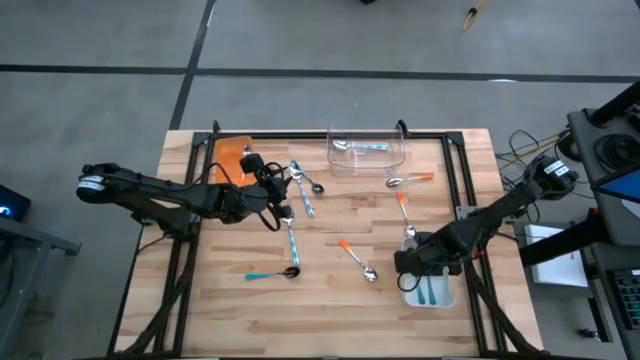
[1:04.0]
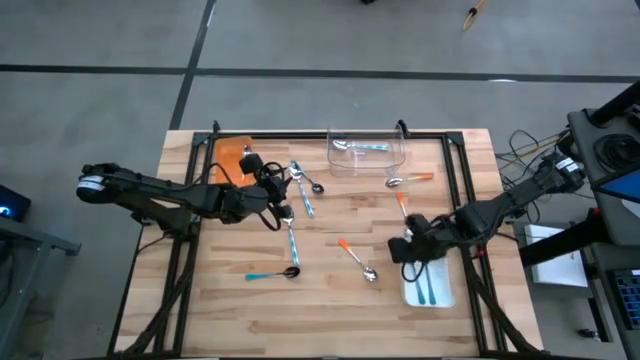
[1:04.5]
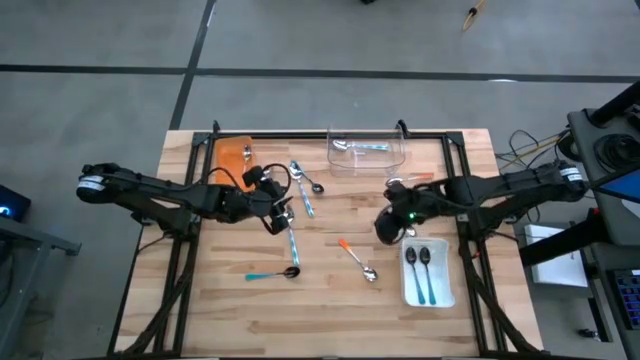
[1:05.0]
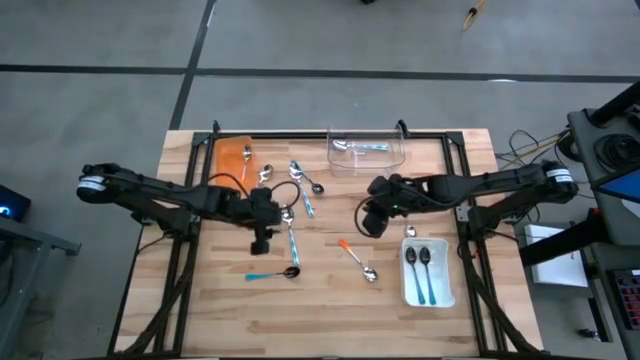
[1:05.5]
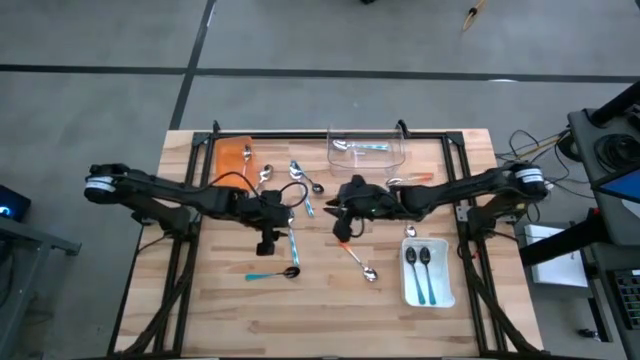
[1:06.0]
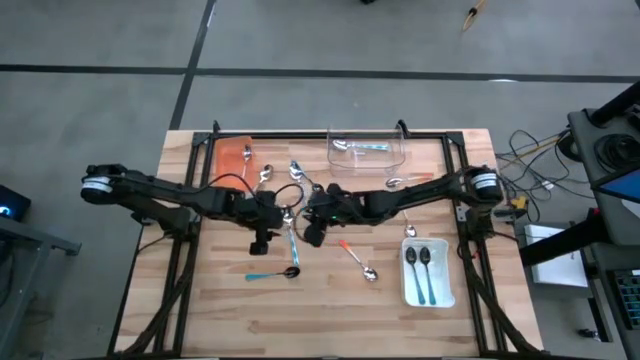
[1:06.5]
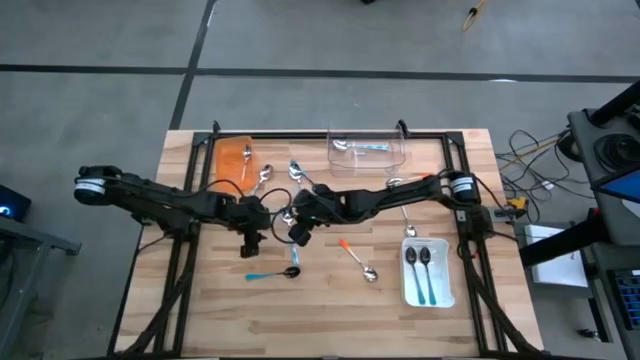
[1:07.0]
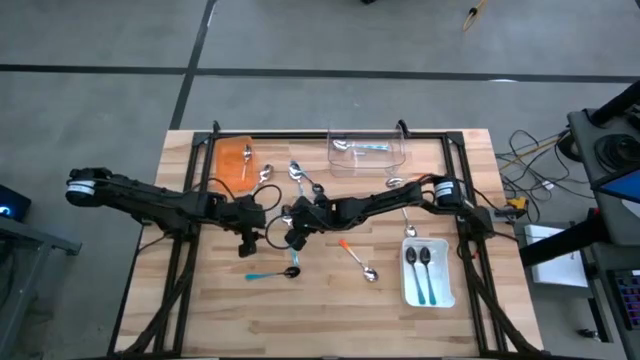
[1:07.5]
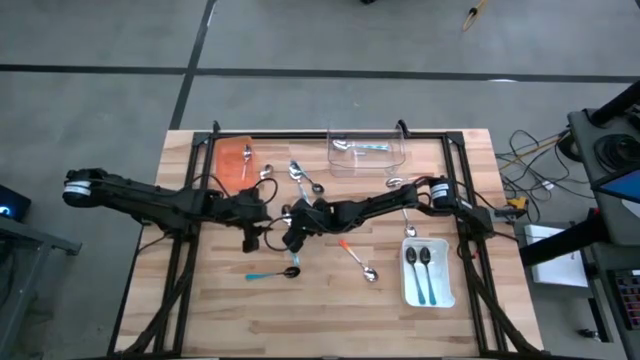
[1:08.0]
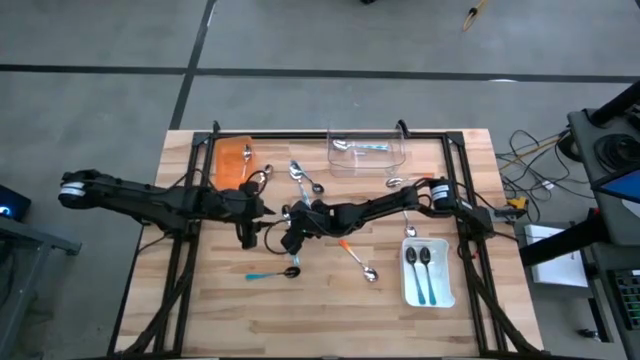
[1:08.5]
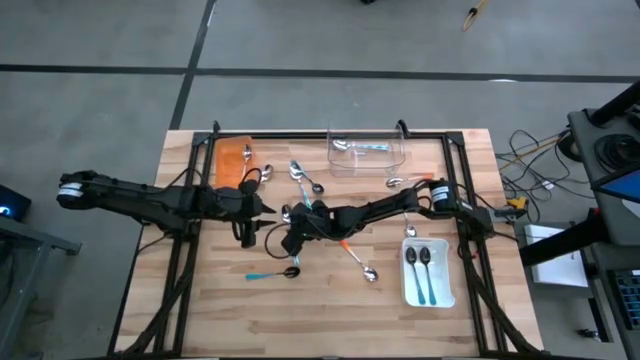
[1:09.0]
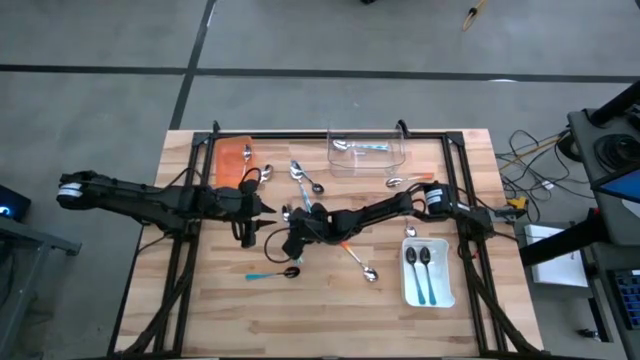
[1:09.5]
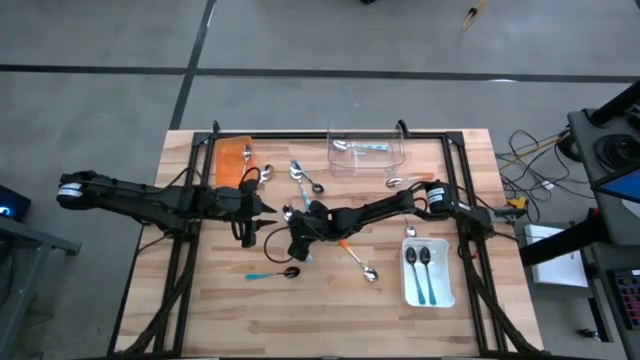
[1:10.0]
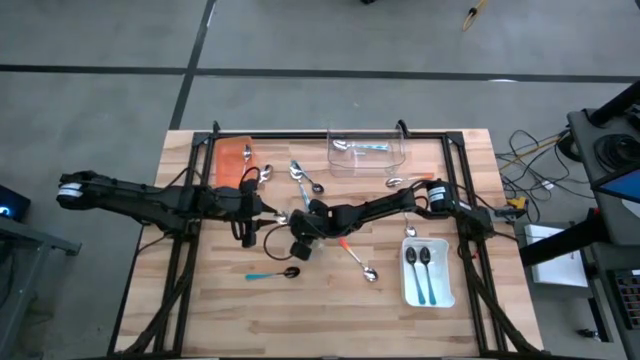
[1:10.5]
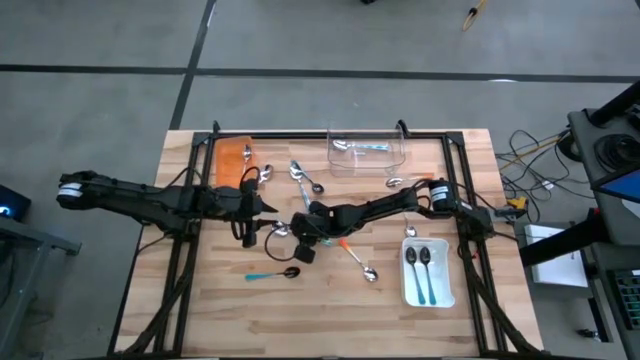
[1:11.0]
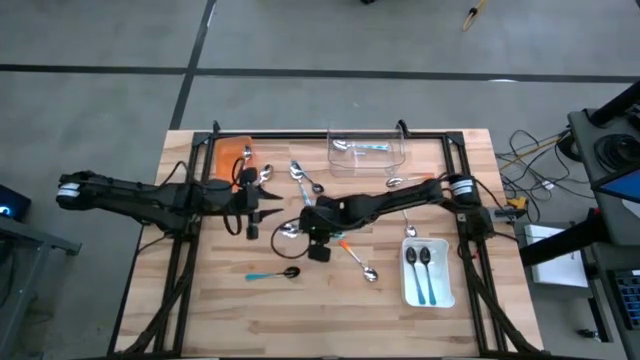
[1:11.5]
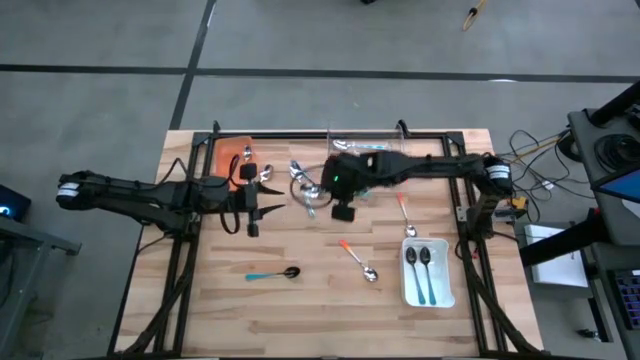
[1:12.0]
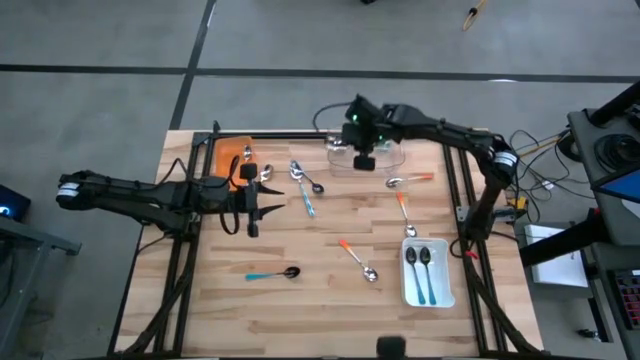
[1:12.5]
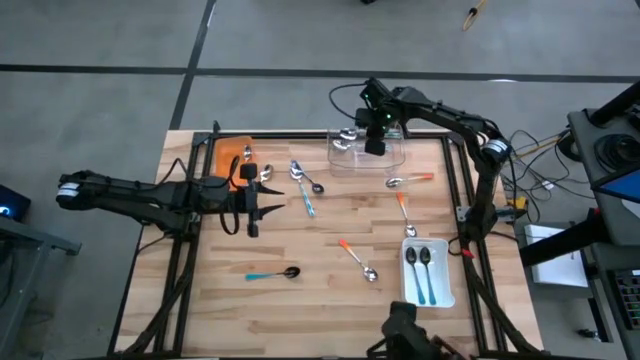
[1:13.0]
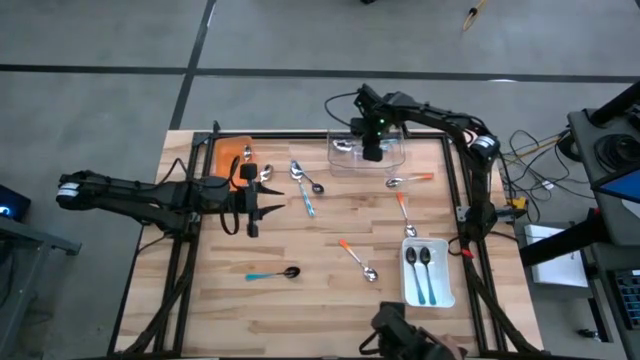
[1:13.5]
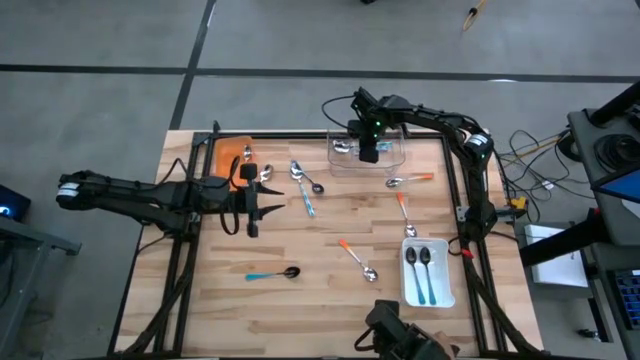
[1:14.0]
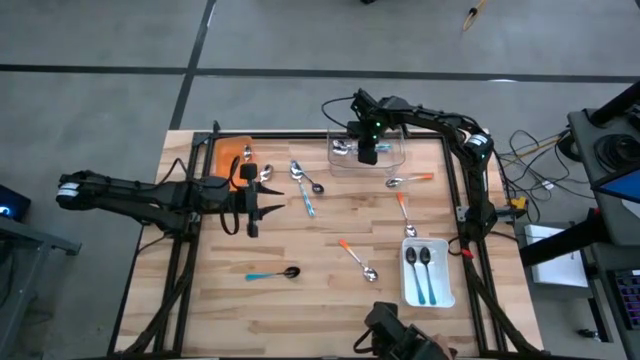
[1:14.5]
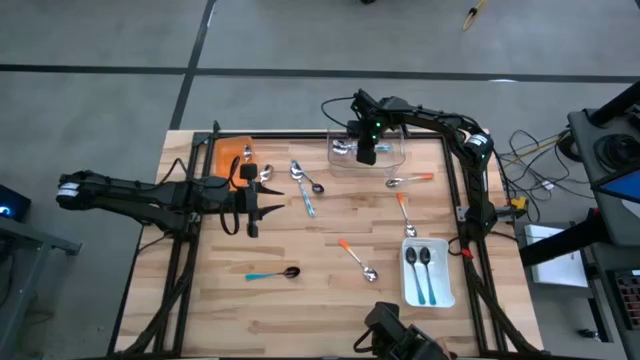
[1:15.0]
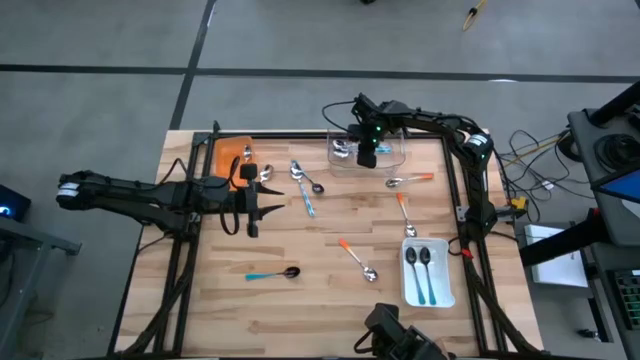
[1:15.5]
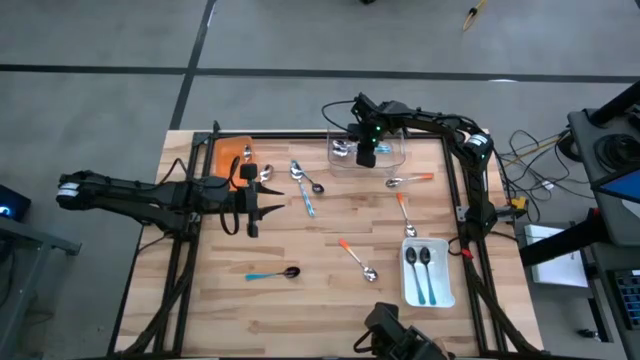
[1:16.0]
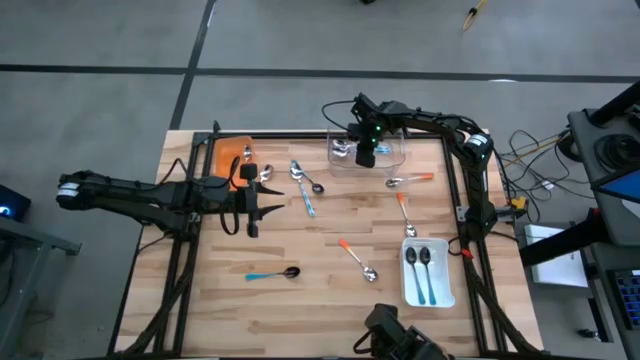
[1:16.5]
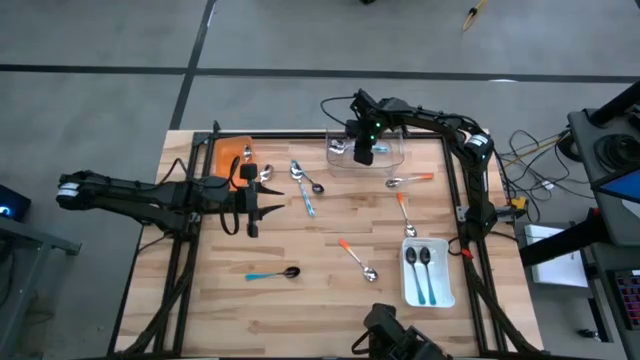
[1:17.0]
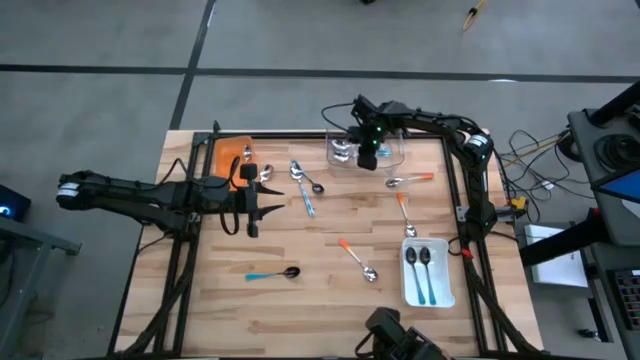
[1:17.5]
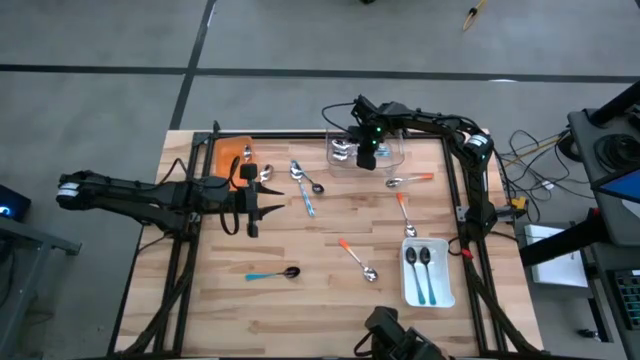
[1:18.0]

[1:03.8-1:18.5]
Task: Sort silverware by color (type)
Put the blue patterned spoon into the transparent bin

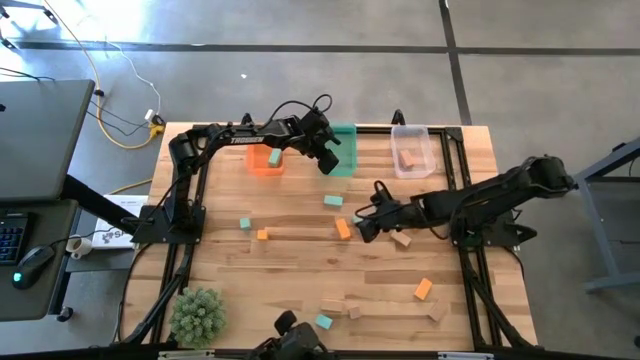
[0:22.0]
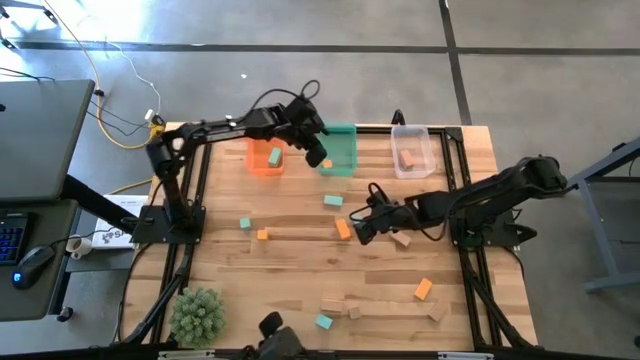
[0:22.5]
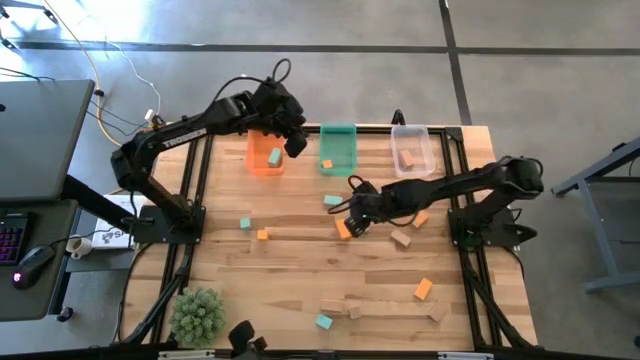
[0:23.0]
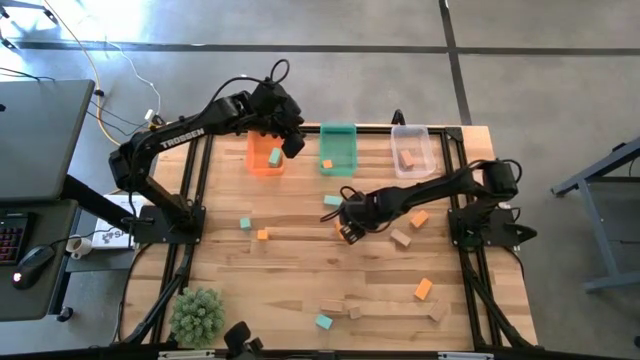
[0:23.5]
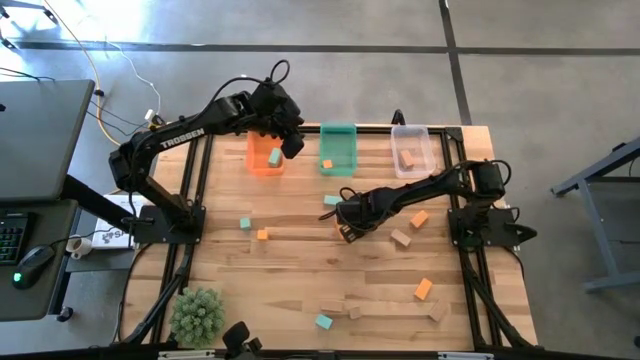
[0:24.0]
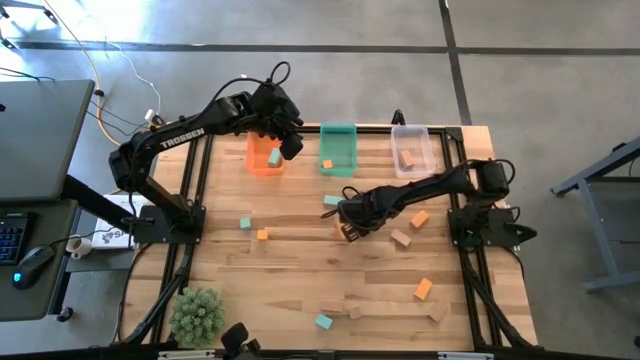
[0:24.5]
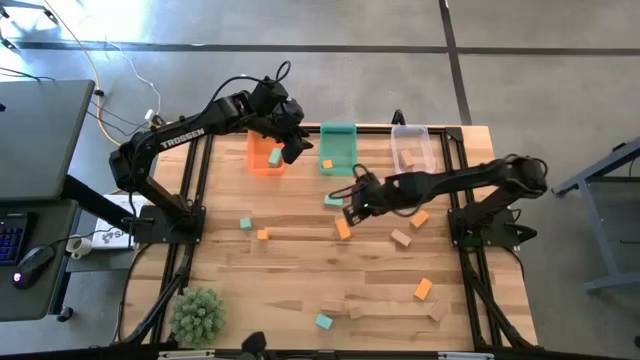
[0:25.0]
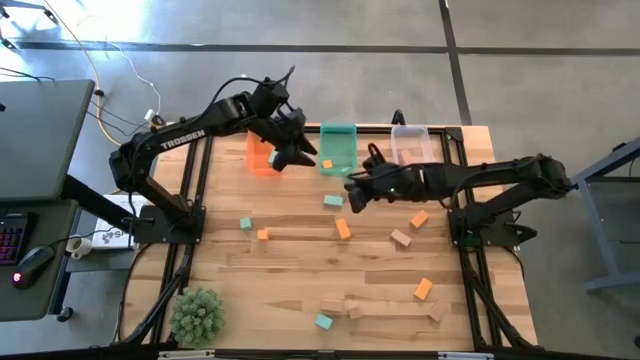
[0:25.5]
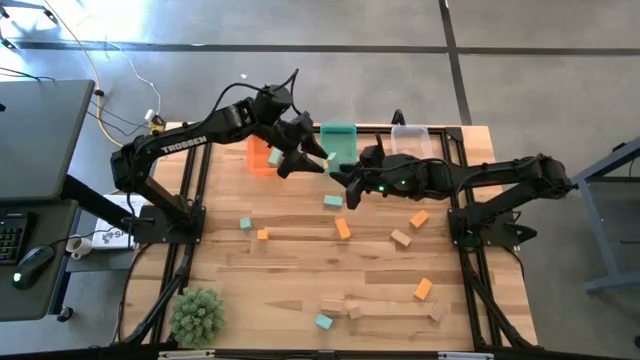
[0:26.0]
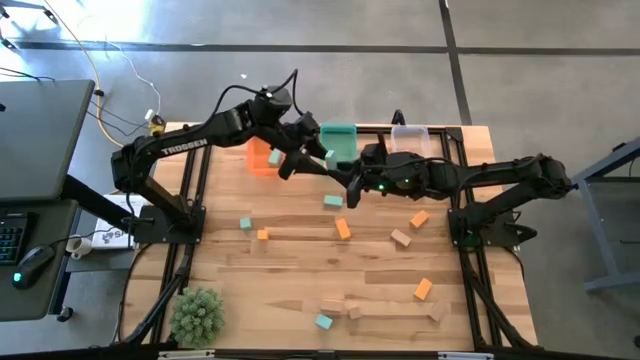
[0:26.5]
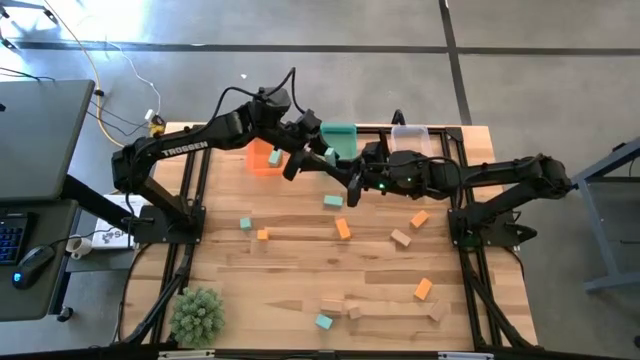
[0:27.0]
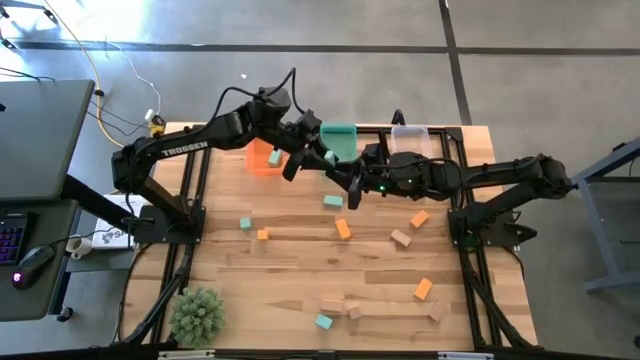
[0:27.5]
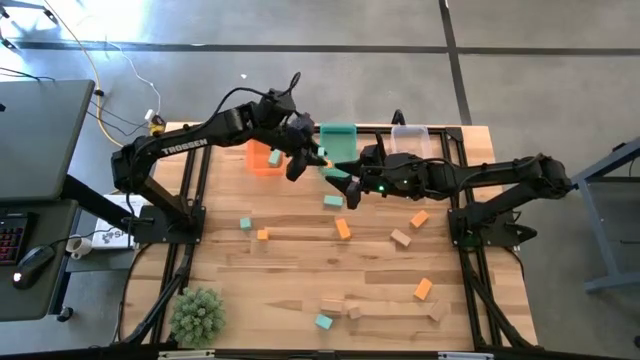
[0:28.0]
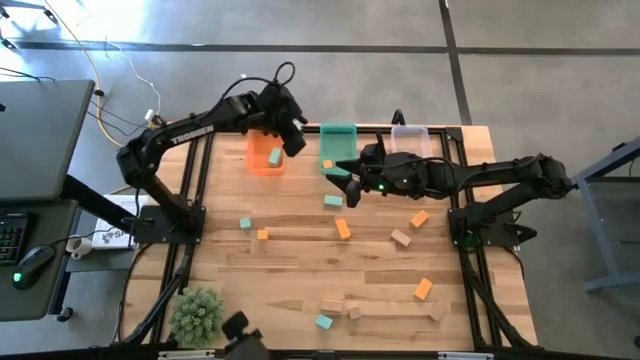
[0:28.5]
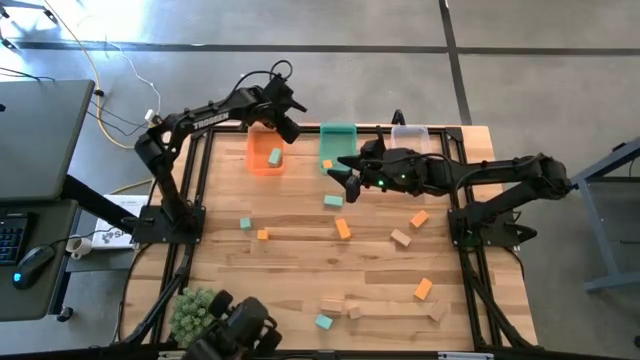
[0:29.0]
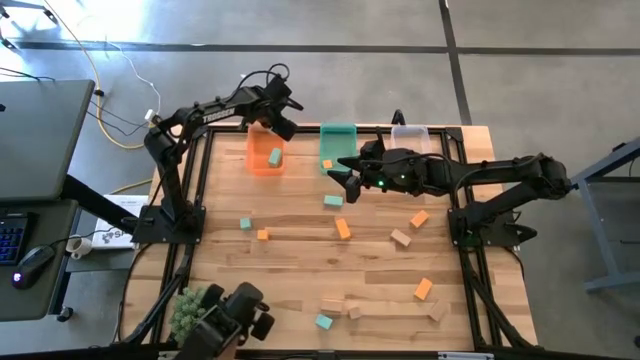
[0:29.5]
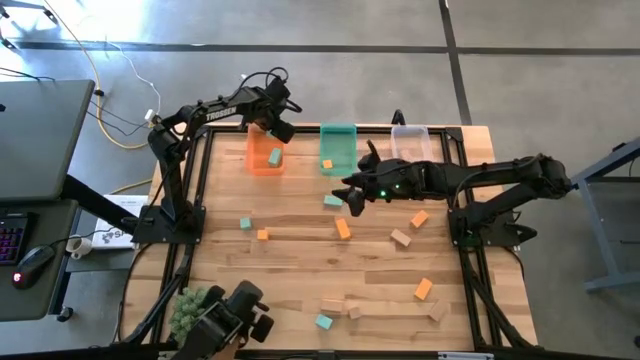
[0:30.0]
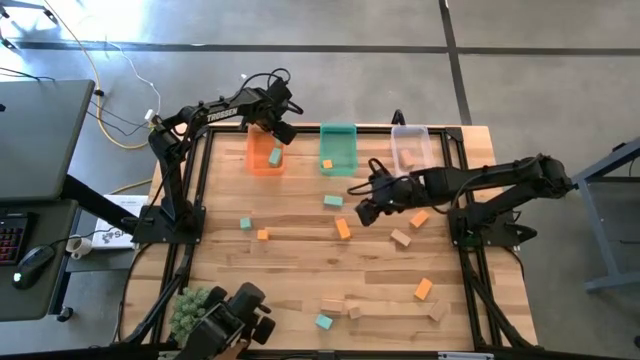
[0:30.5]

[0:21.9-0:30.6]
Task: Sort & place blocks by color
Put the light blue block into the orange bin
